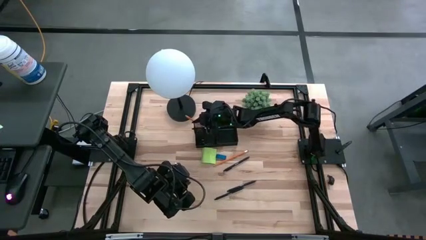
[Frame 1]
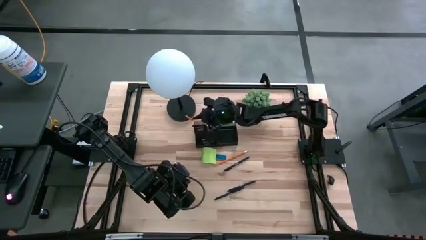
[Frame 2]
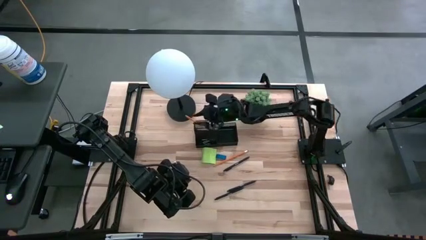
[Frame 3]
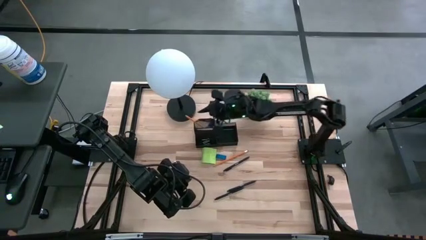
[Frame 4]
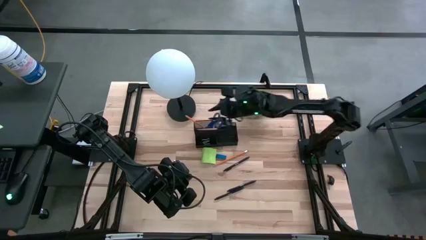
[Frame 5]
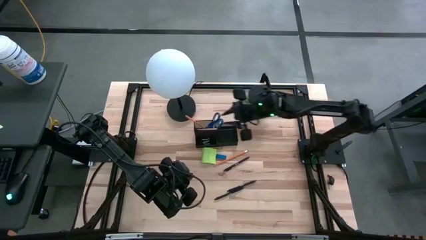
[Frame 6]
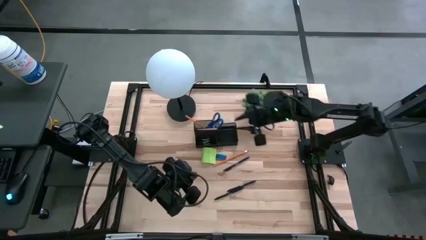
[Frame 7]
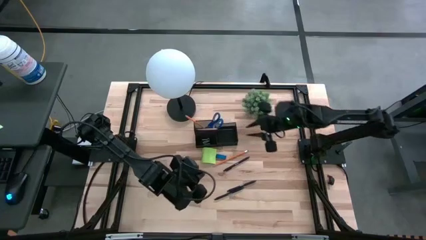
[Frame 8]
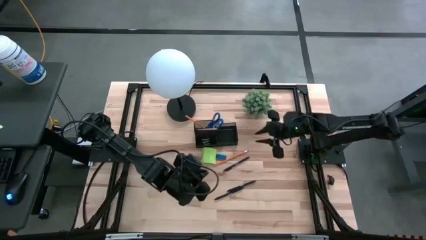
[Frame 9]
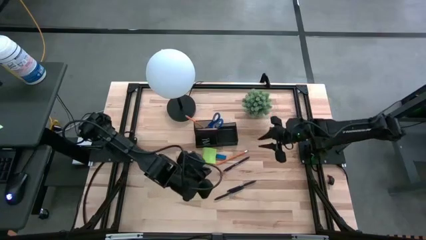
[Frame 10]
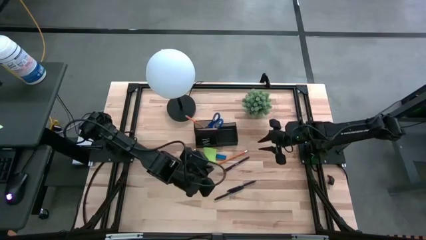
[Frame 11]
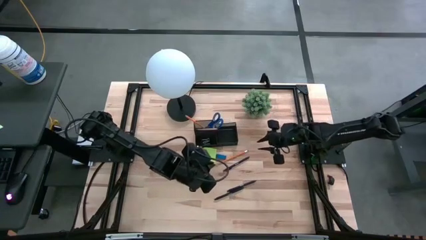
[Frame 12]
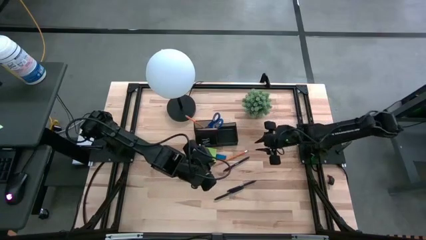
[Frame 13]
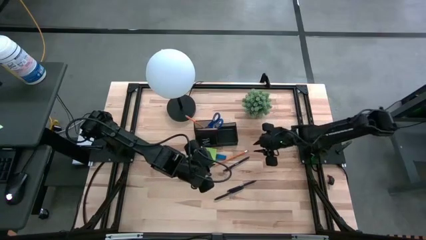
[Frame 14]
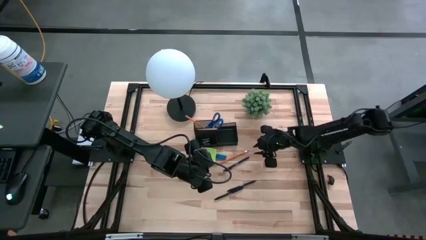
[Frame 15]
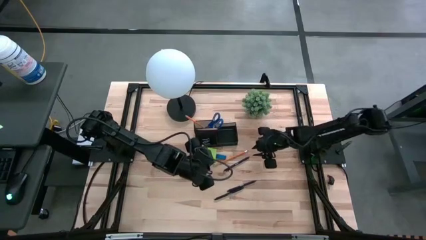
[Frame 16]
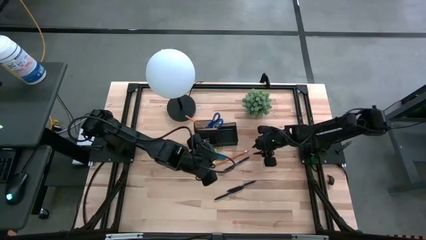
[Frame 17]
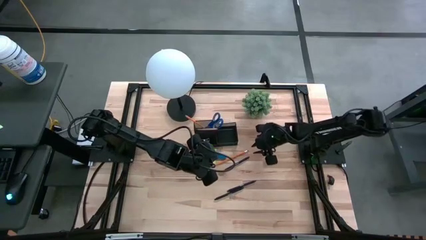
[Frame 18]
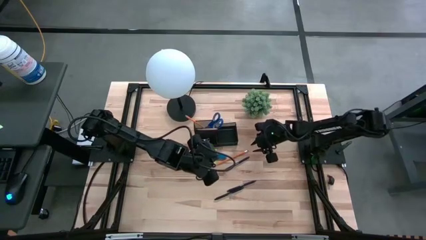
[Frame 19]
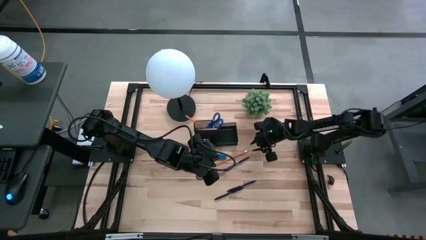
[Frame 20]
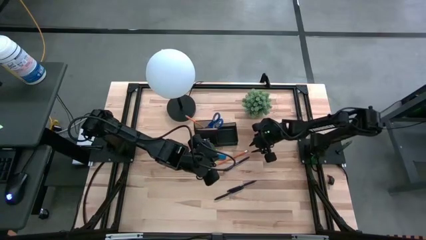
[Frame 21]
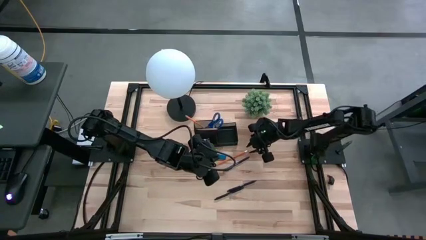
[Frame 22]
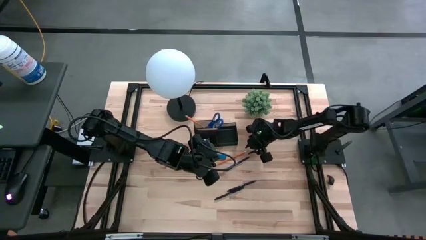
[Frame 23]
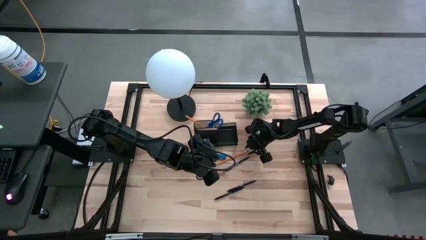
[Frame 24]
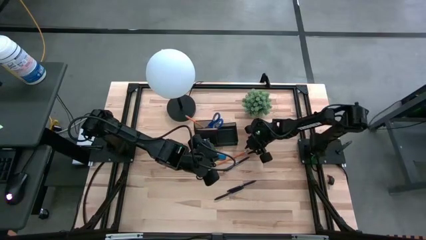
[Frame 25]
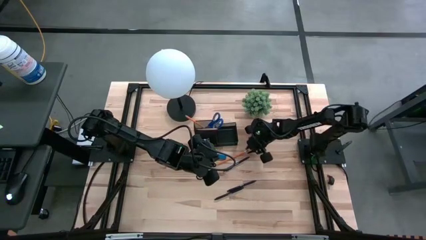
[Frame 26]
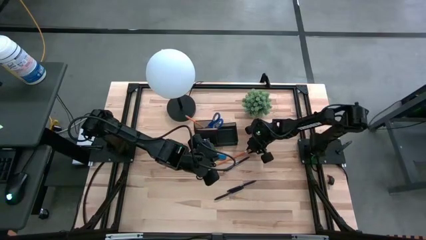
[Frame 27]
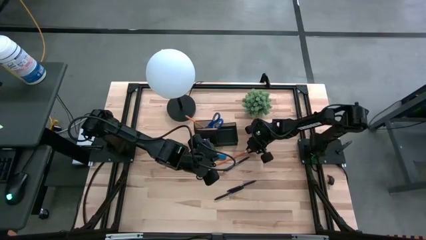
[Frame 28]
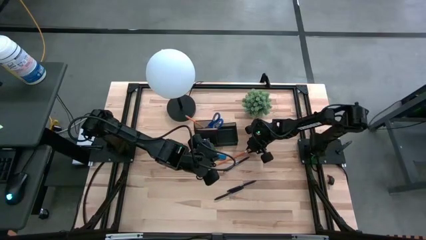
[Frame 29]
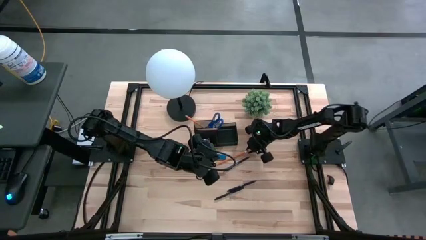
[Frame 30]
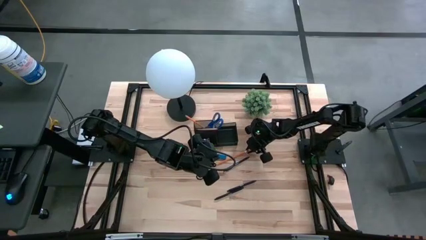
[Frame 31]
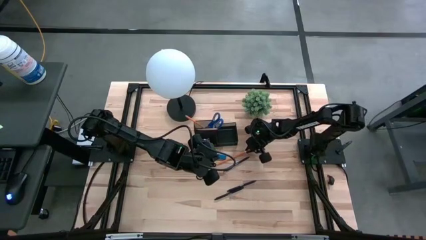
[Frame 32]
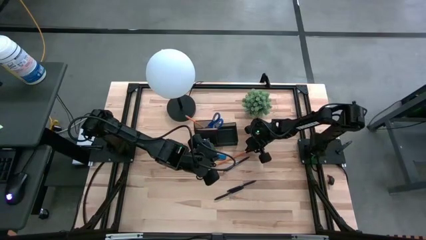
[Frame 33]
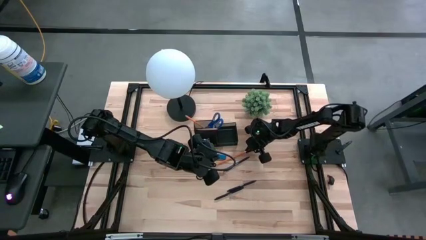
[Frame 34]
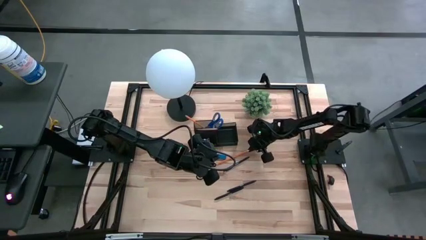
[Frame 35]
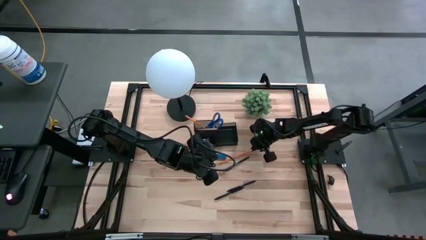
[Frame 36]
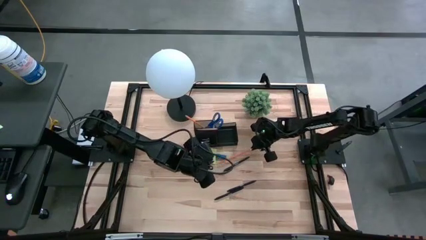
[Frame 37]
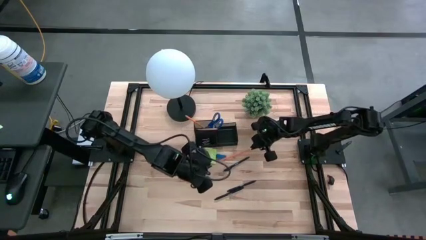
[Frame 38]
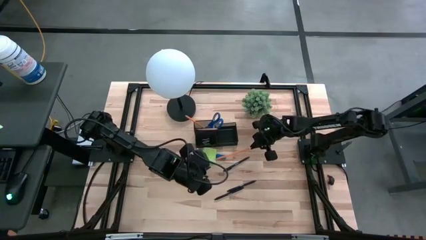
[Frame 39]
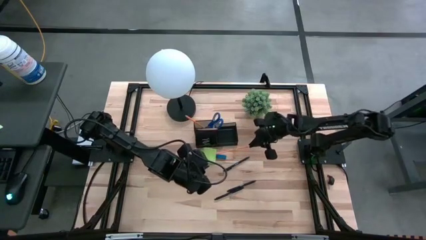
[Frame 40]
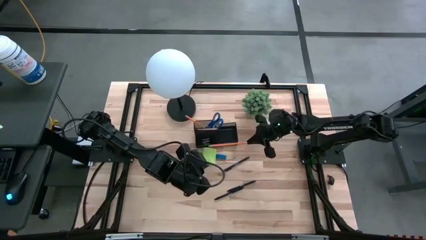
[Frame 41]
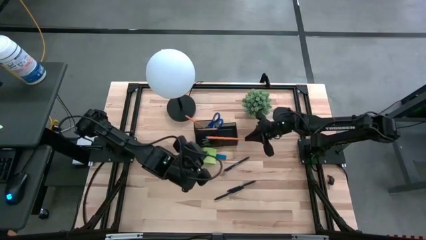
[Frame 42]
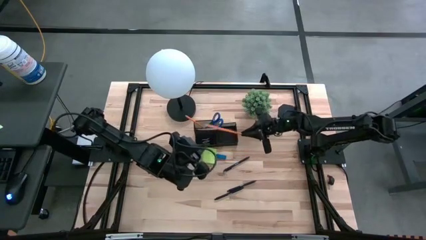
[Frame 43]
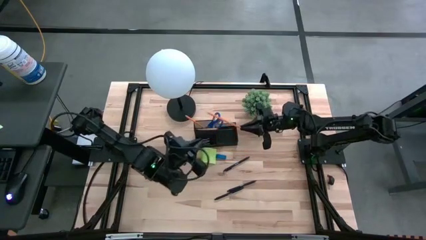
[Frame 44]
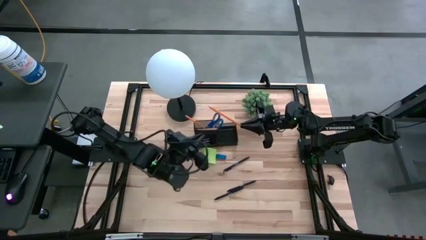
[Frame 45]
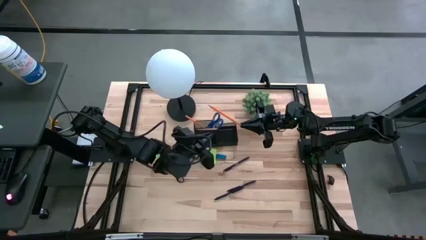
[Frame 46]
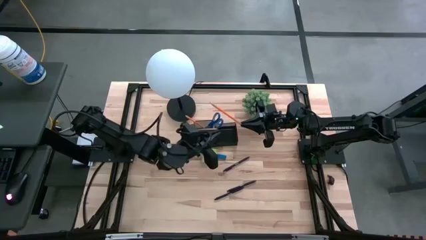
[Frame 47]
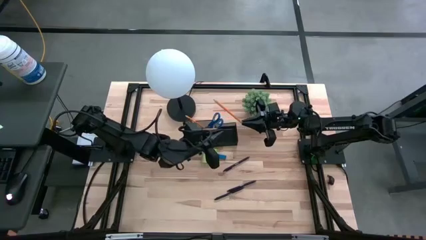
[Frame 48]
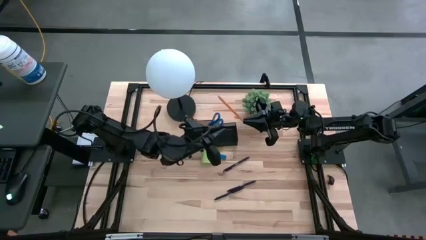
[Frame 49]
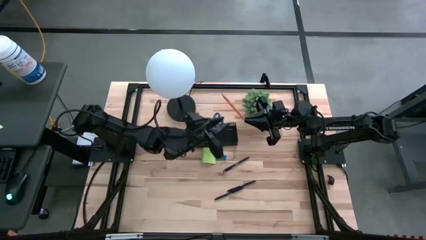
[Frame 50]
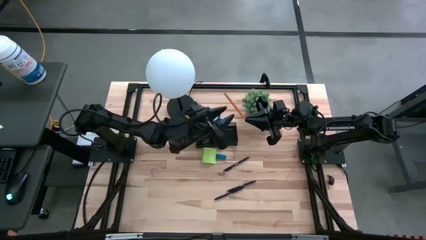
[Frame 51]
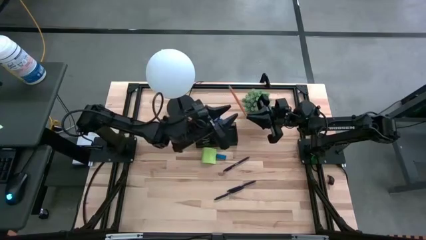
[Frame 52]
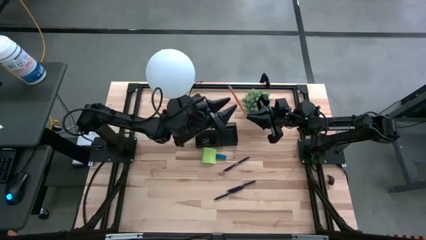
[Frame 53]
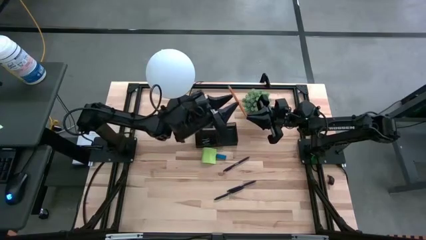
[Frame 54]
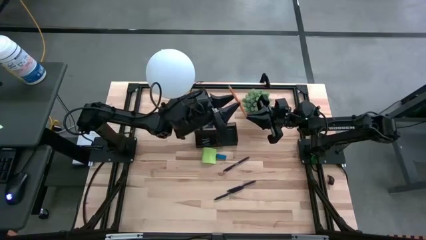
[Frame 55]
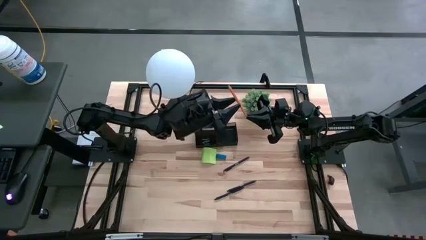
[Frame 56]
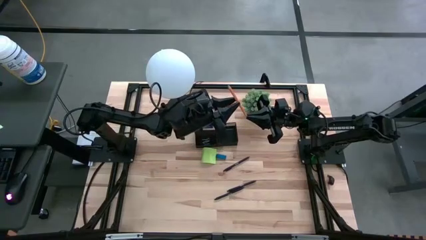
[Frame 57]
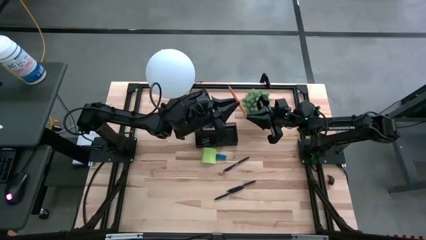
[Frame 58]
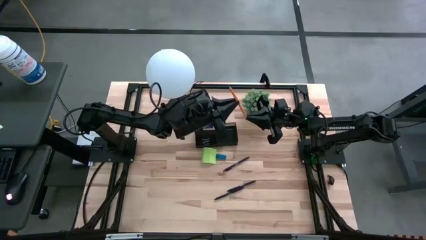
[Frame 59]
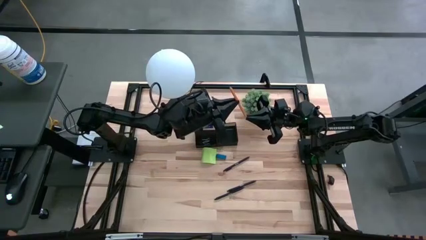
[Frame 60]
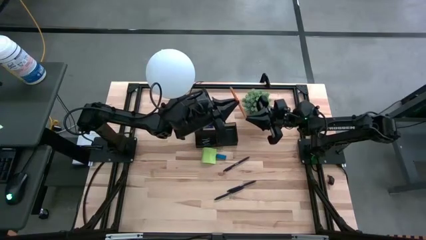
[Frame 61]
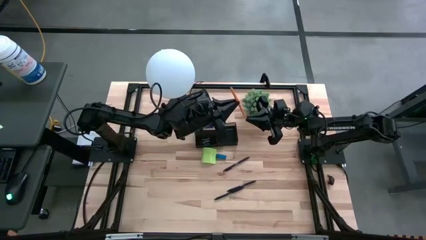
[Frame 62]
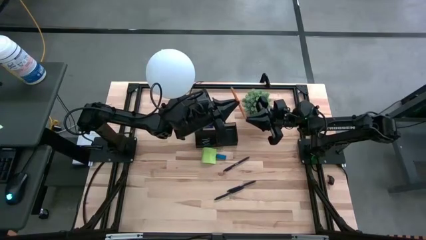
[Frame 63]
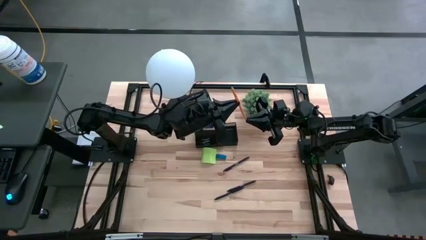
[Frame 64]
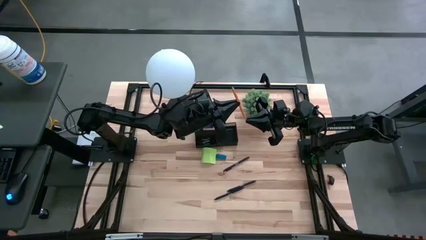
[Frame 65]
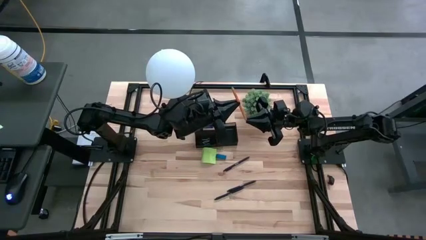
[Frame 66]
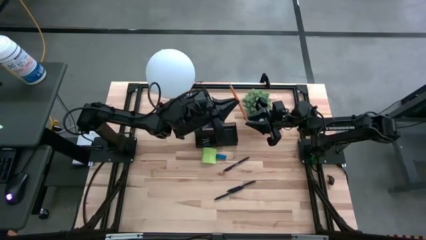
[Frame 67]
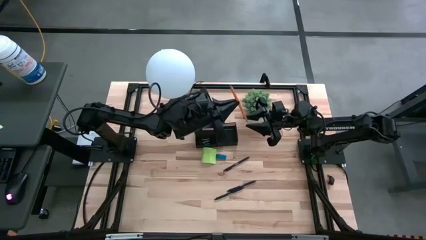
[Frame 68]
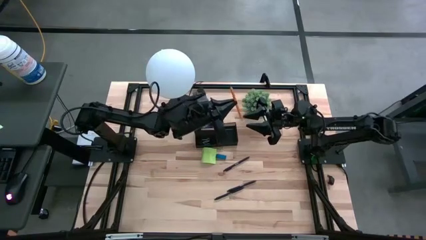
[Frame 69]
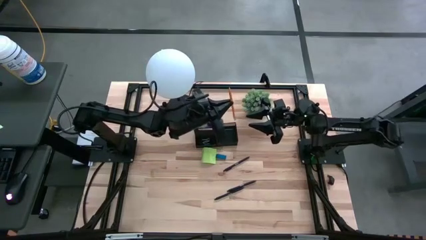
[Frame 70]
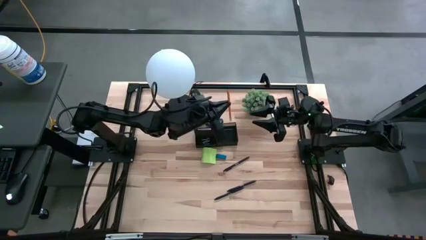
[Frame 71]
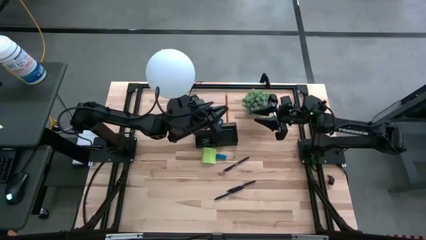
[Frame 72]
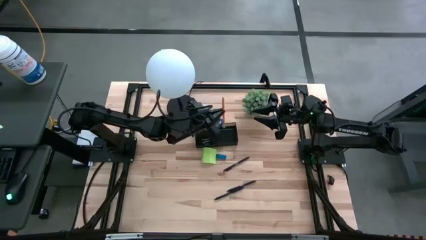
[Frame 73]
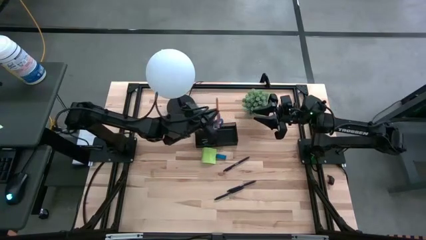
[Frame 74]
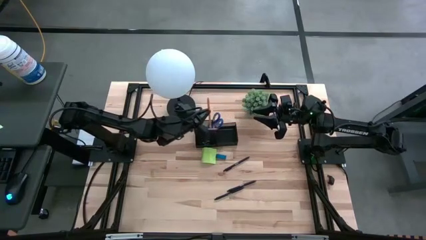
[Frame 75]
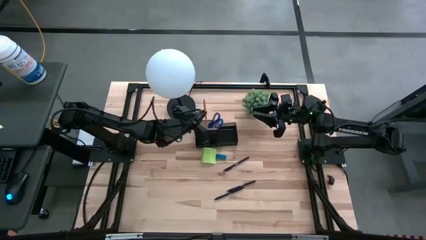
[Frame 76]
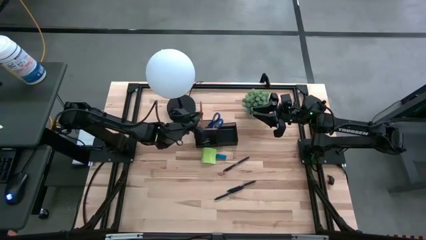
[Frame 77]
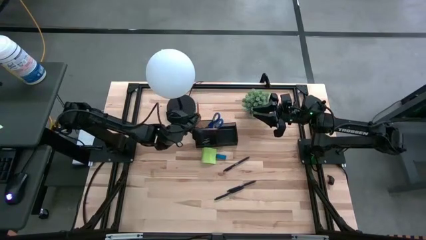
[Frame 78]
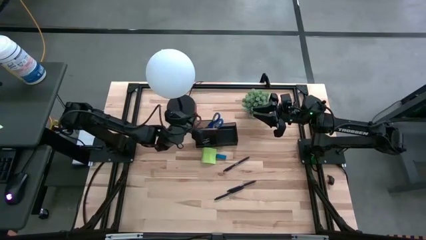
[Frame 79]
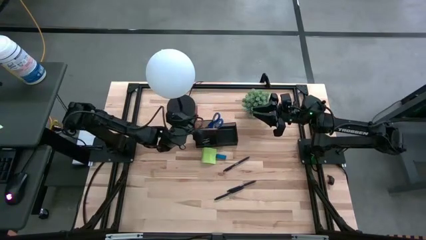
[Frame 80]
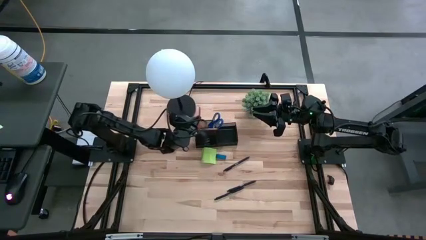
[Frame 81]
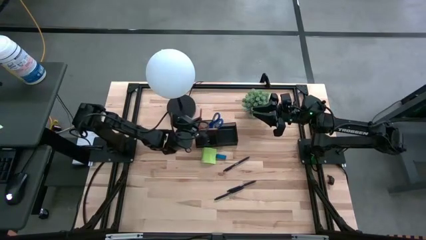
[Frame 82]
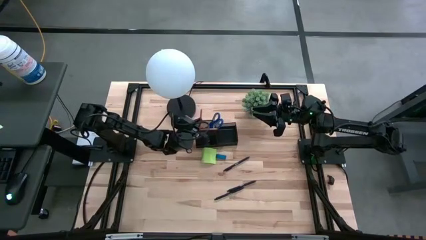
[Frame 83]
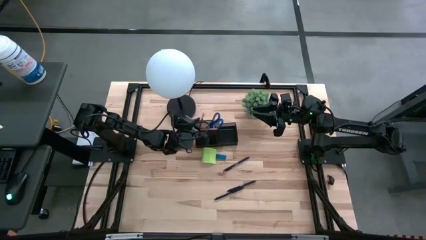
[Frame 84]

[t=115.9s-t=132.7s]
Task: Pick and place office supplies into organizer
Put the orange pencil into the top left side of the desk organizer
